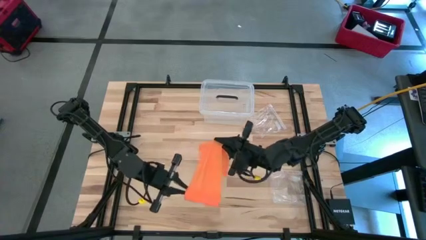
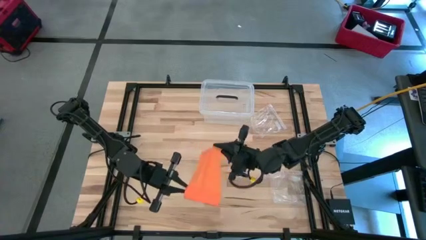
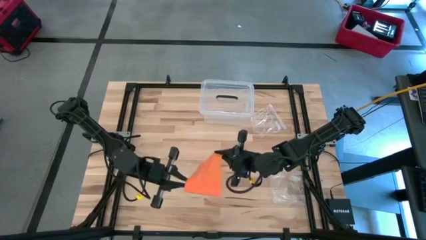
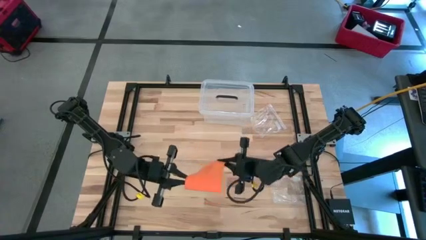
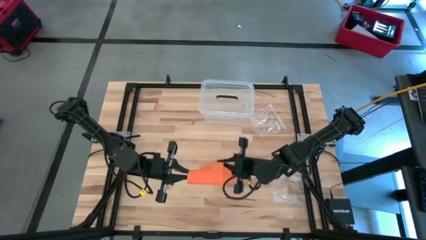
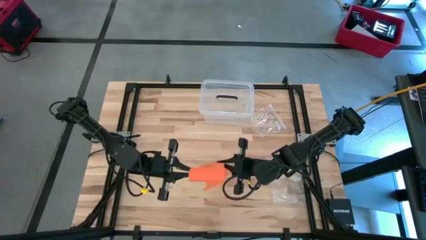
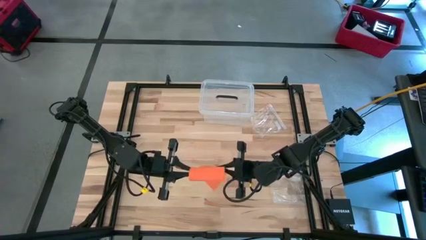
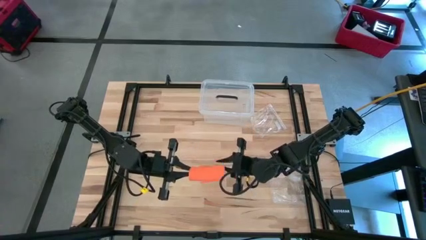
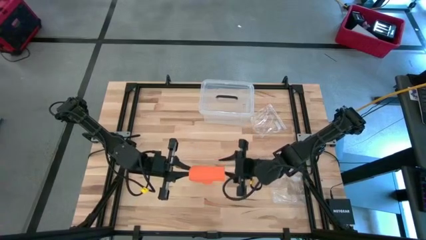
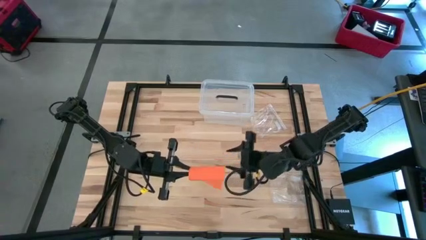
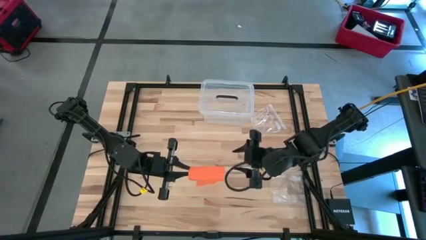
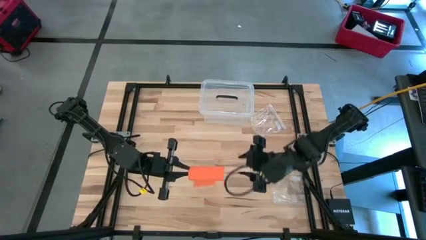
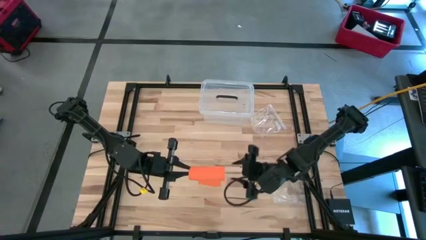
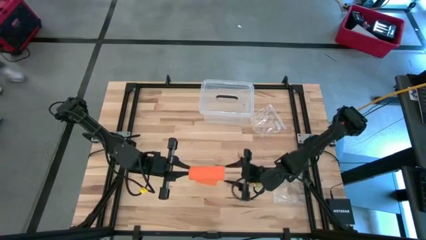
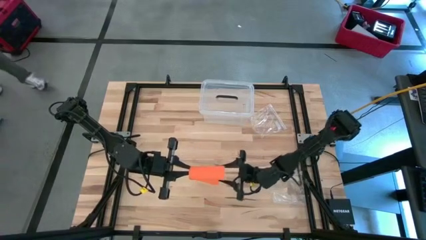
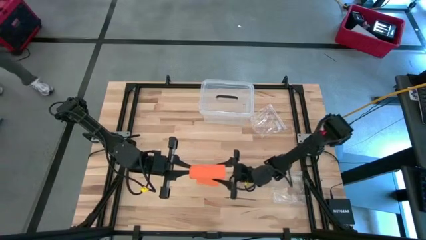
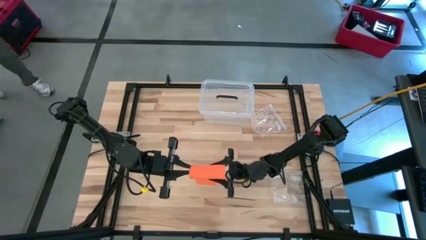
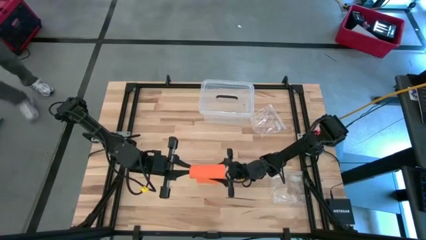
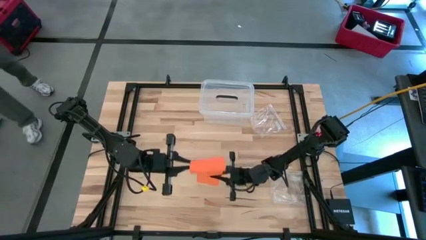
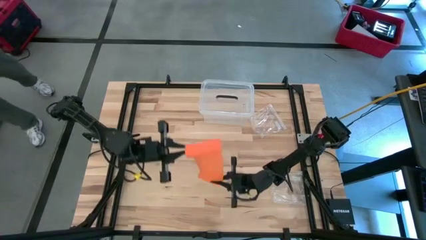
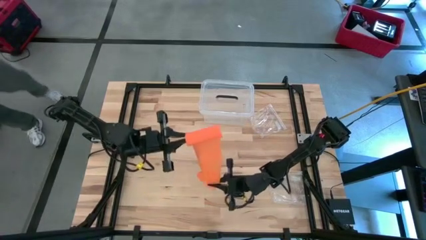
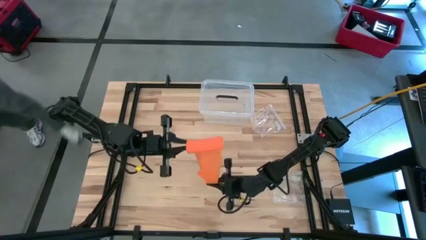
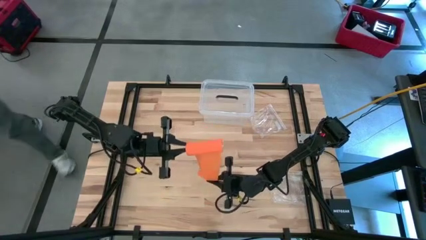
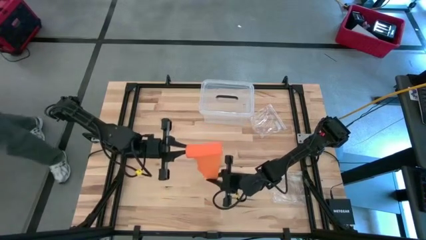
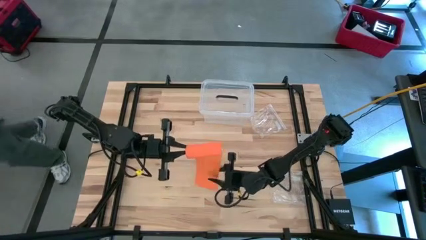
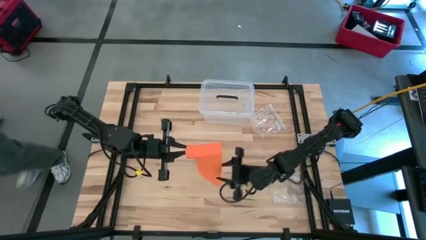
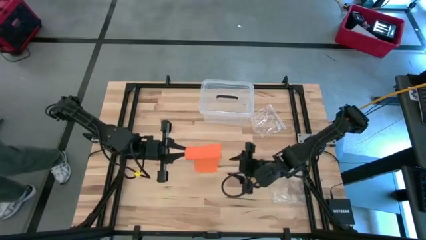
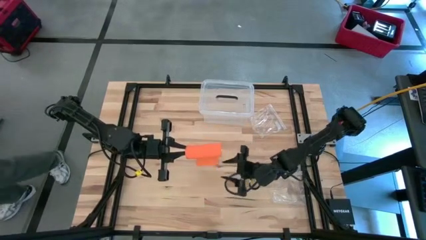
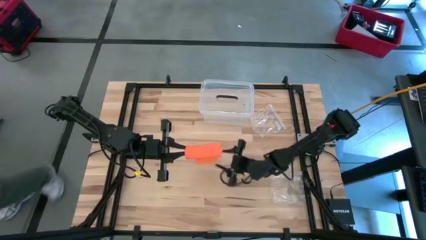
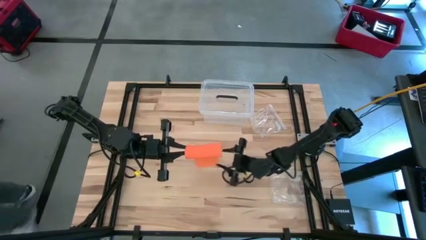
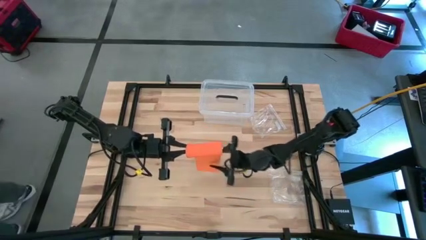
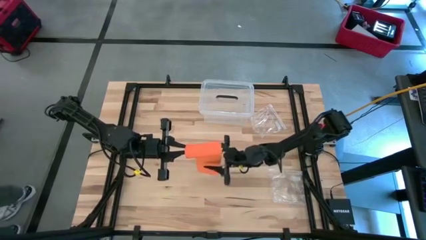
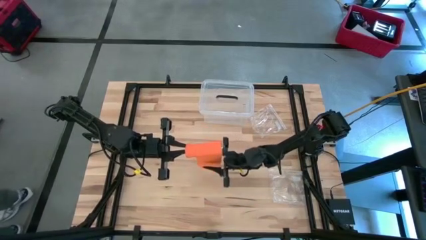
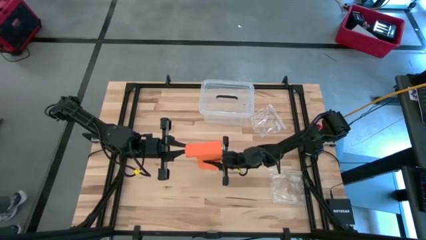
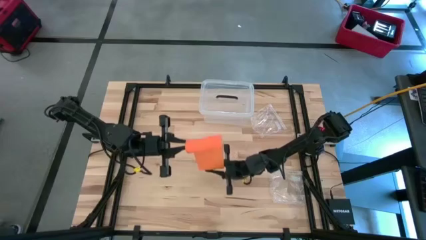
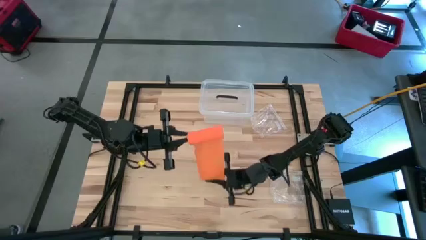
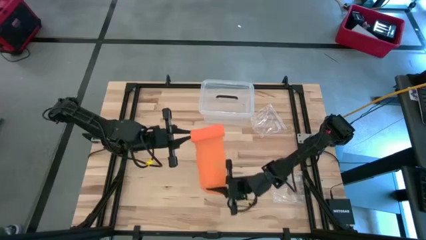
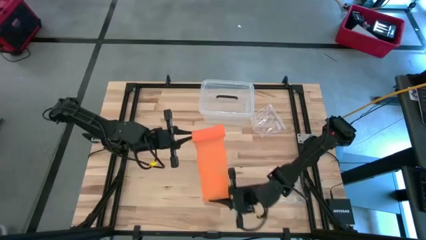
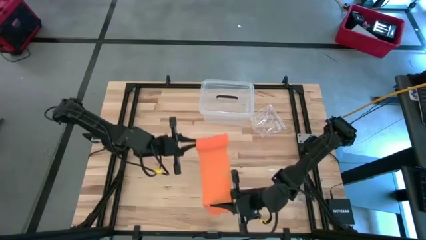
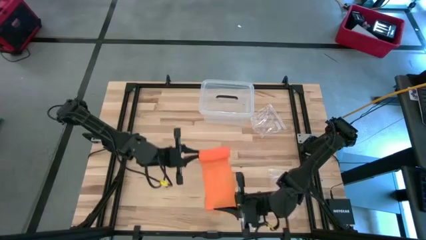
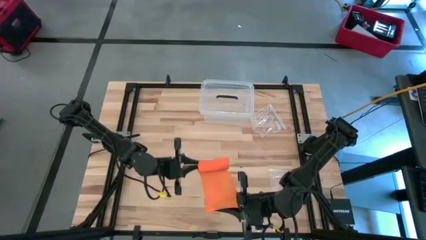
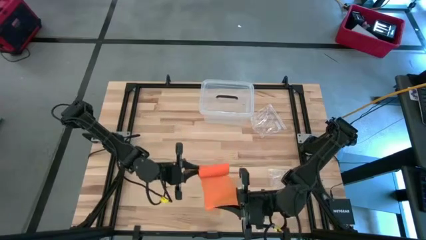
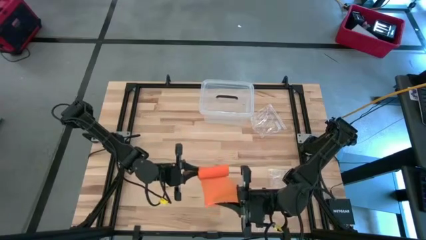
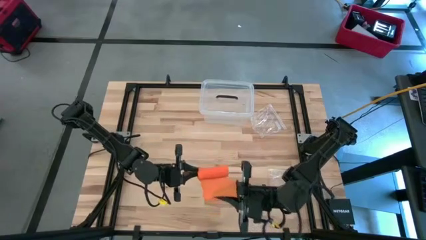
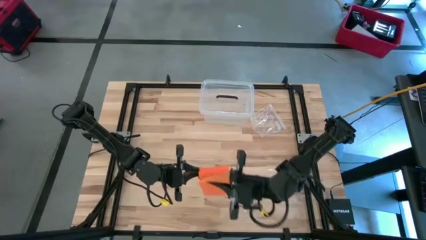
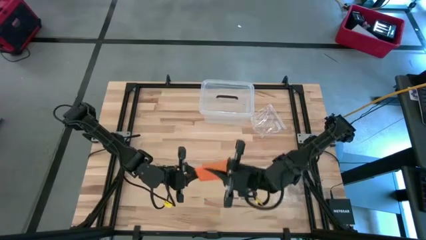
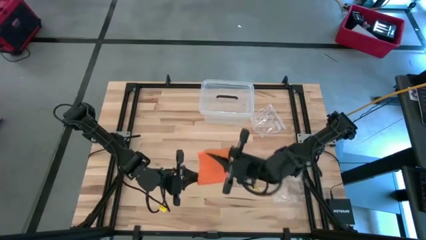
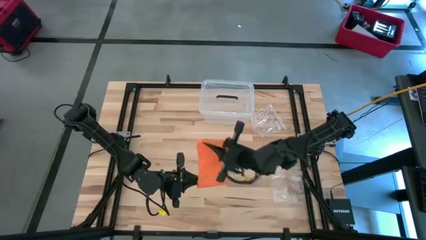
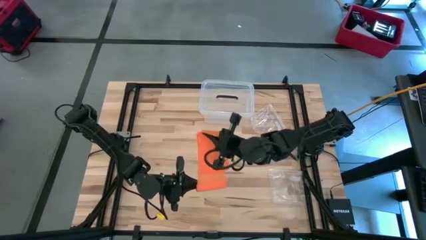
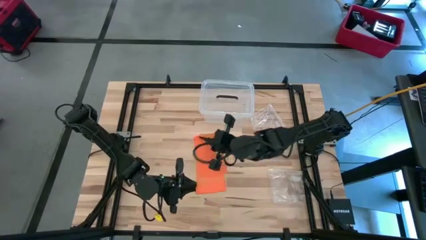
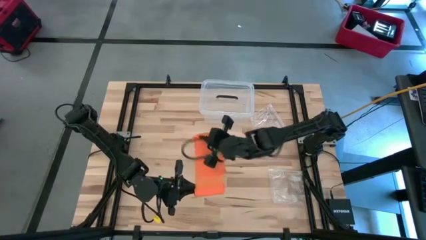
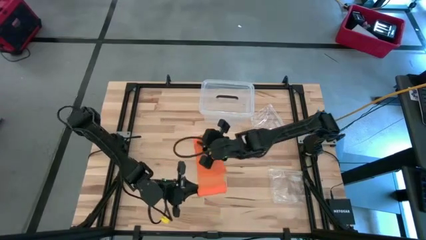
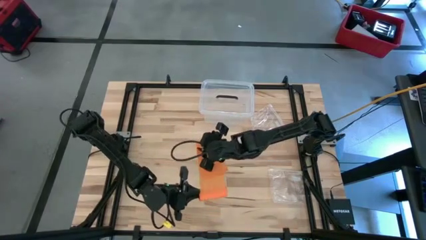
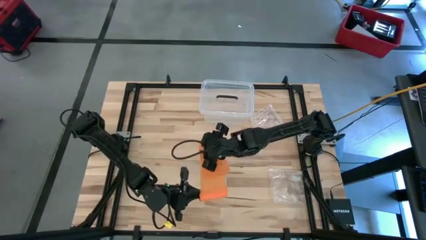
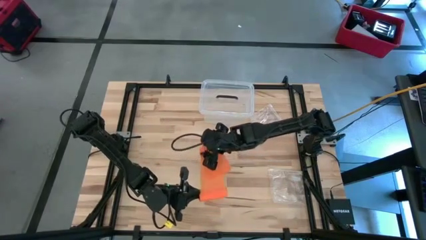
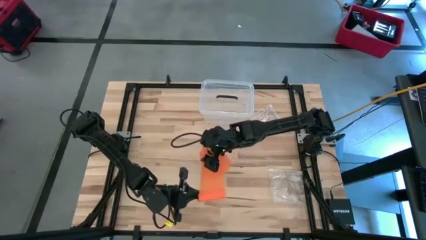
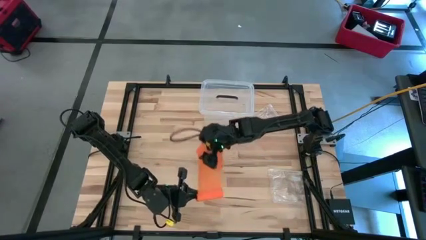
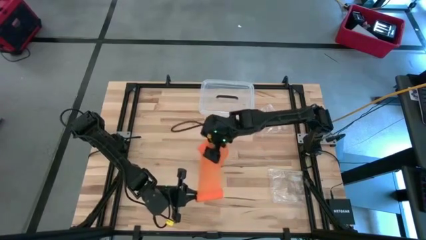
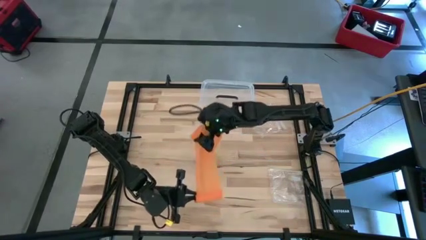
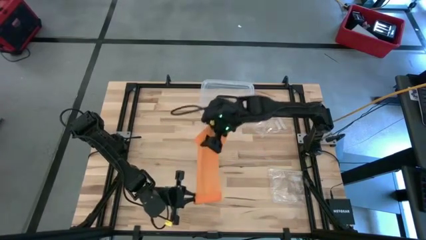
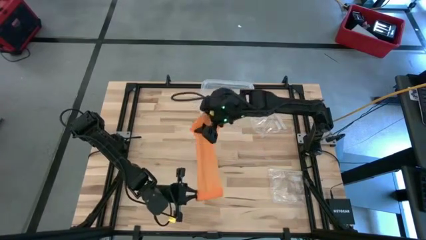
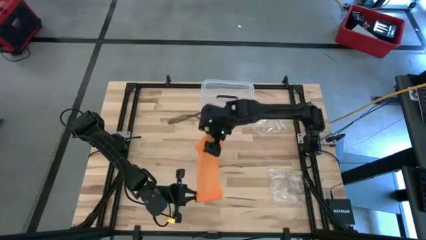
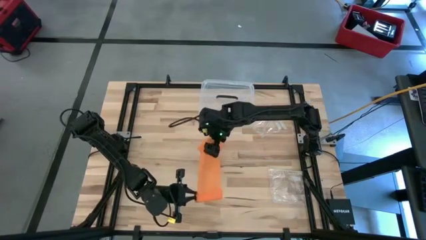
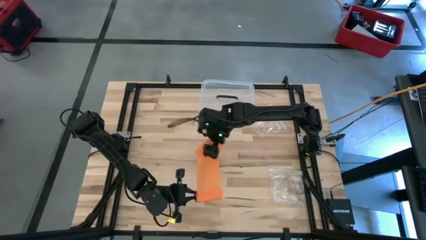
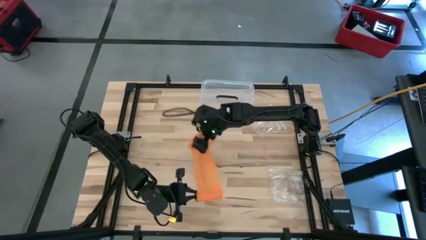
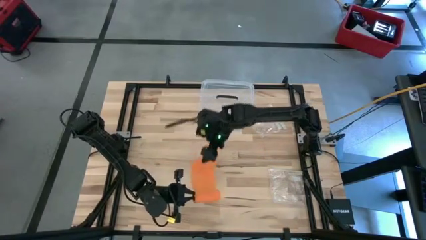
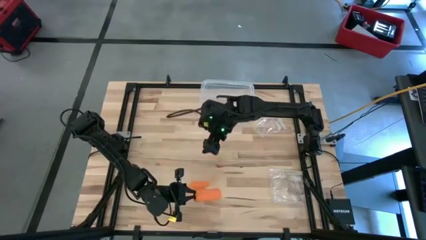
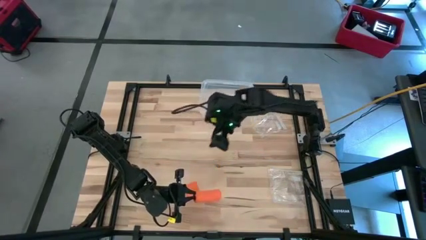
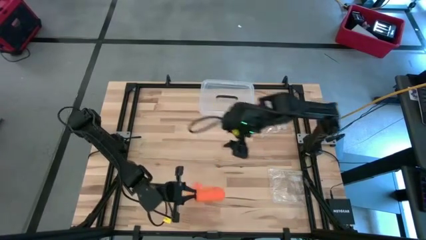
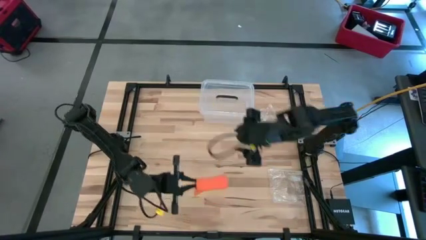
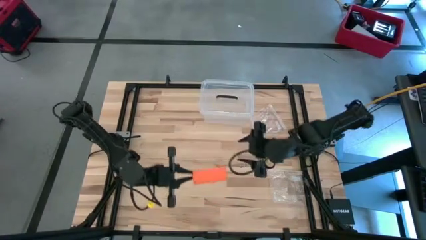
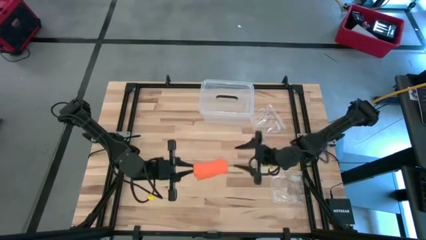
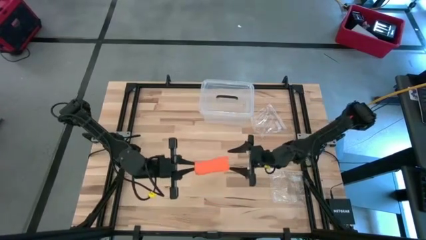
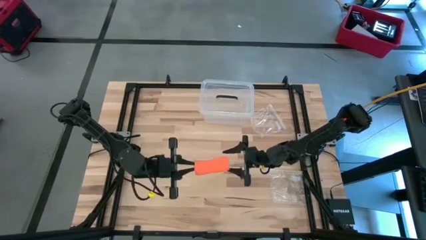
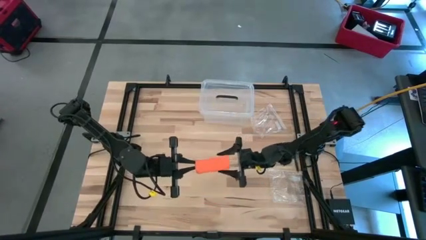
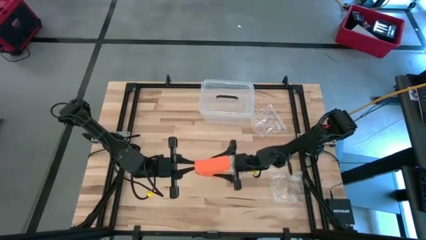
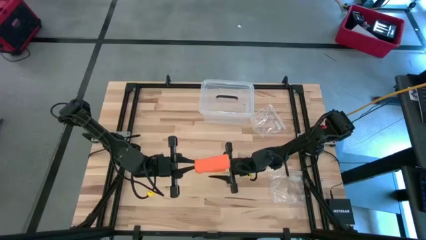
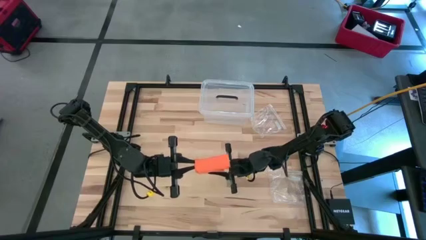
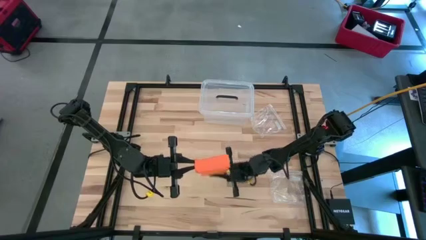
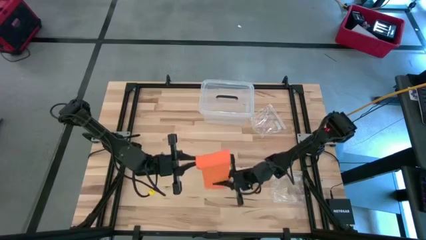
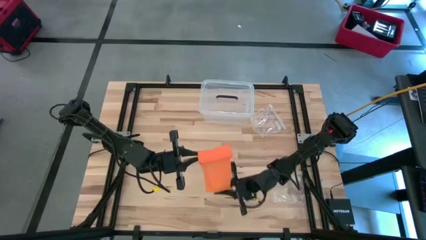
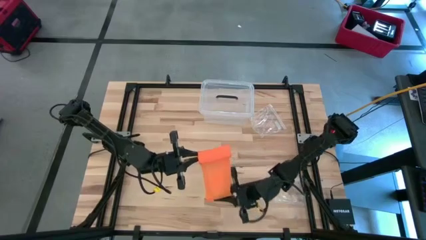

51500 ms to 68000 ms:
Task: Roll bandage
Roll the orange bandage
